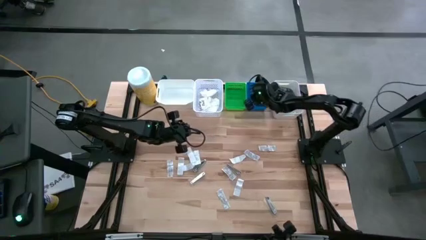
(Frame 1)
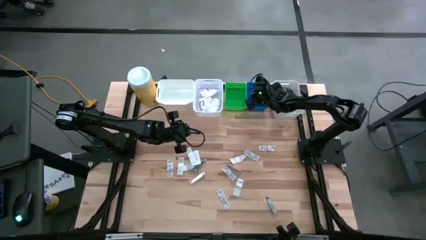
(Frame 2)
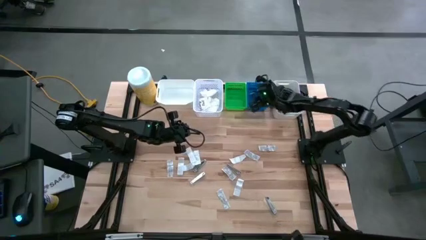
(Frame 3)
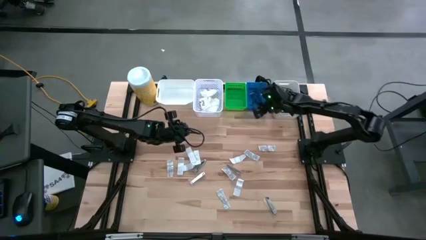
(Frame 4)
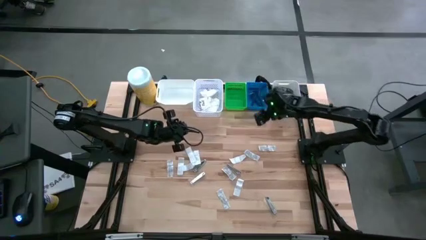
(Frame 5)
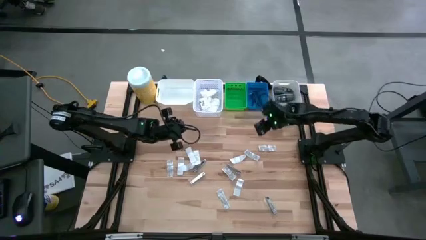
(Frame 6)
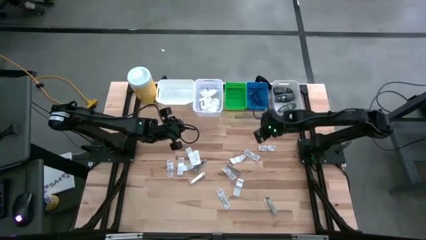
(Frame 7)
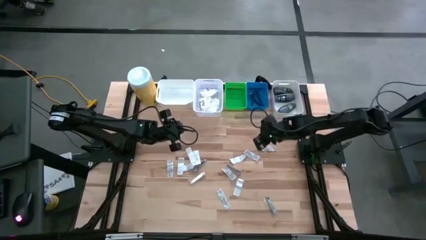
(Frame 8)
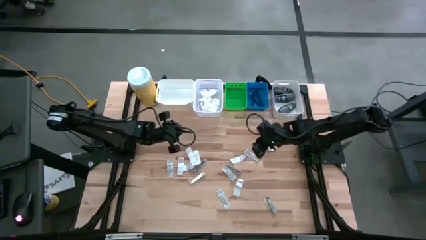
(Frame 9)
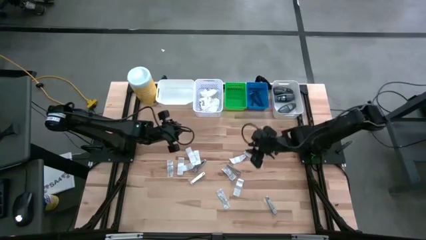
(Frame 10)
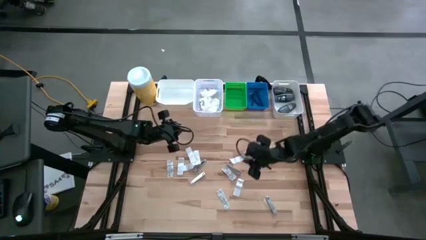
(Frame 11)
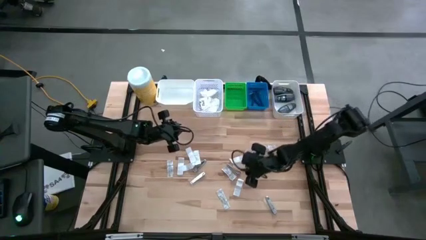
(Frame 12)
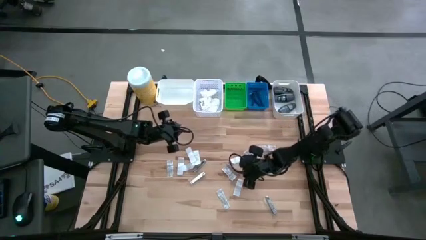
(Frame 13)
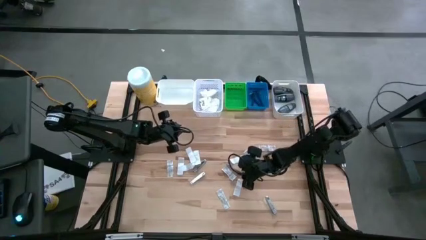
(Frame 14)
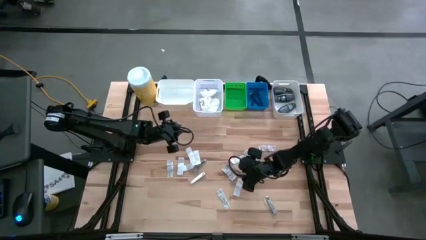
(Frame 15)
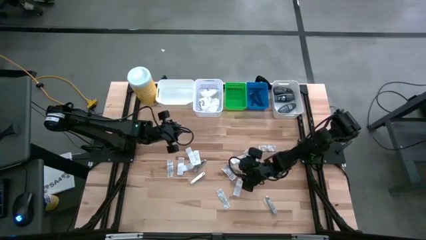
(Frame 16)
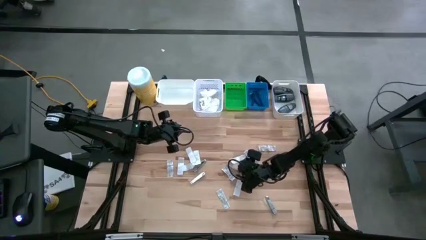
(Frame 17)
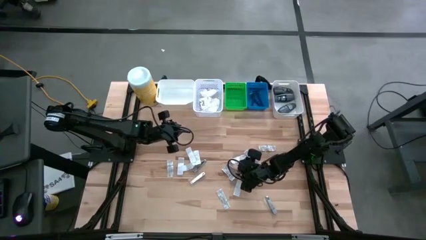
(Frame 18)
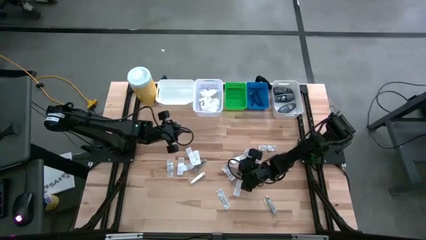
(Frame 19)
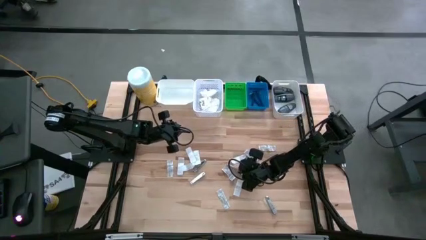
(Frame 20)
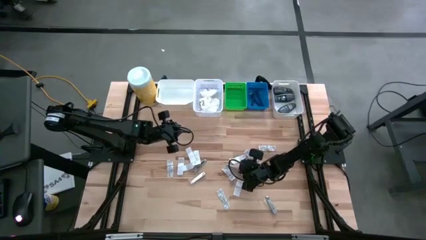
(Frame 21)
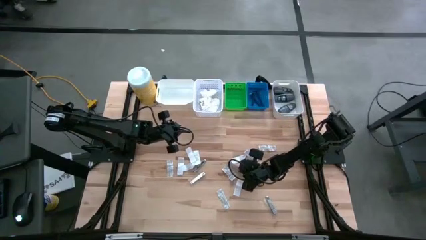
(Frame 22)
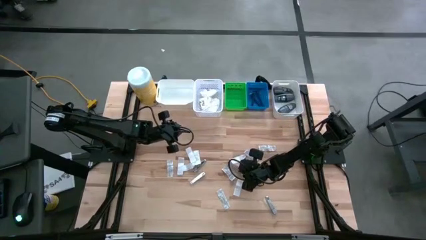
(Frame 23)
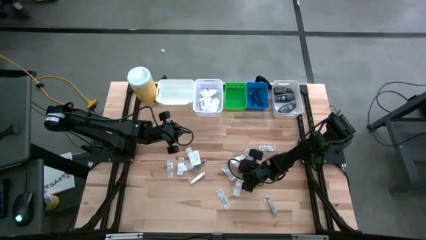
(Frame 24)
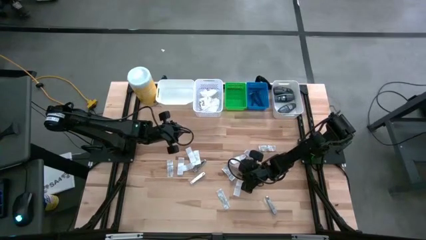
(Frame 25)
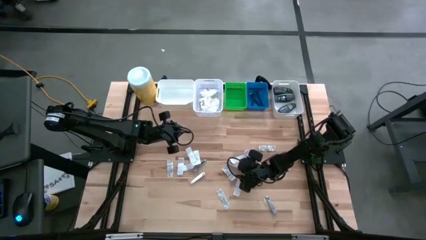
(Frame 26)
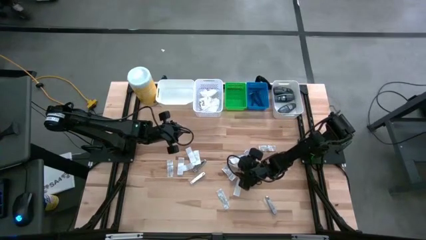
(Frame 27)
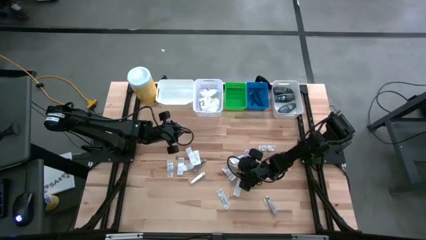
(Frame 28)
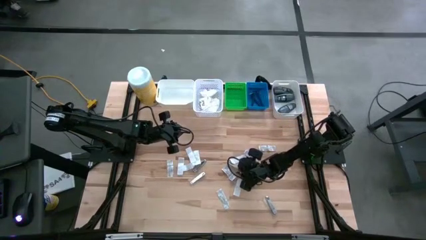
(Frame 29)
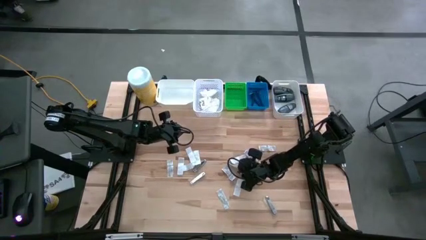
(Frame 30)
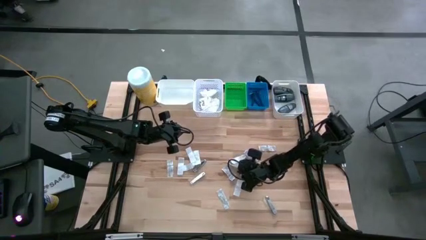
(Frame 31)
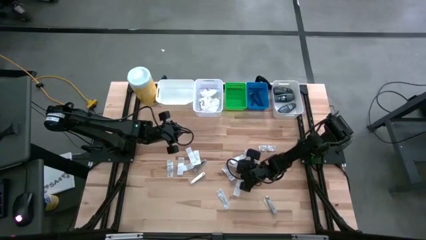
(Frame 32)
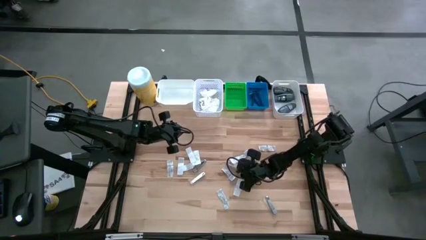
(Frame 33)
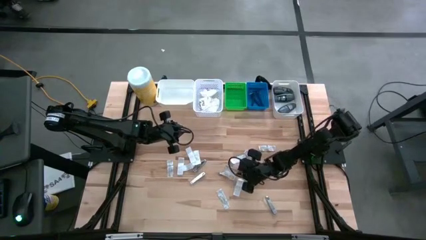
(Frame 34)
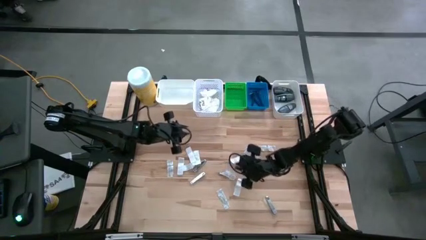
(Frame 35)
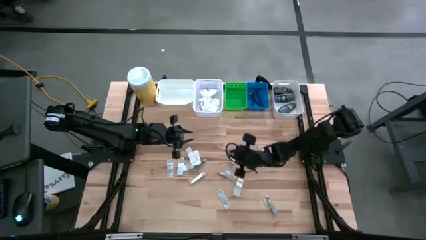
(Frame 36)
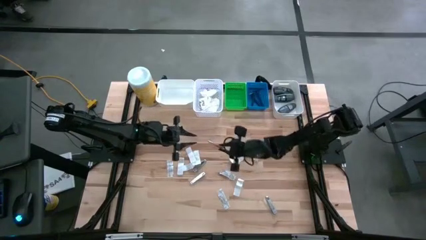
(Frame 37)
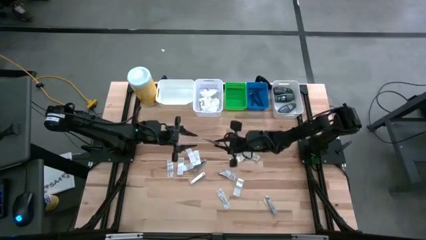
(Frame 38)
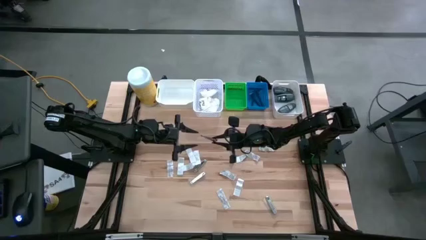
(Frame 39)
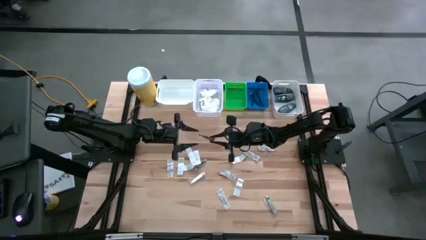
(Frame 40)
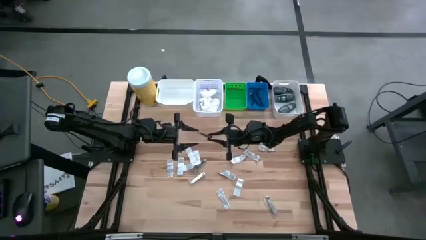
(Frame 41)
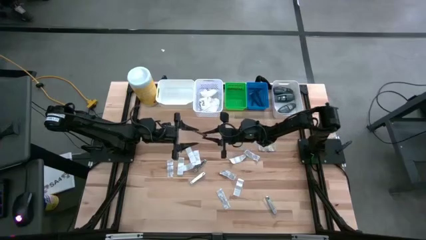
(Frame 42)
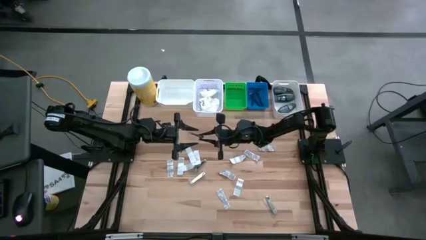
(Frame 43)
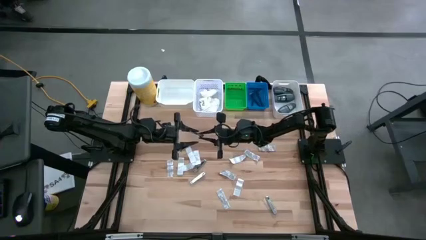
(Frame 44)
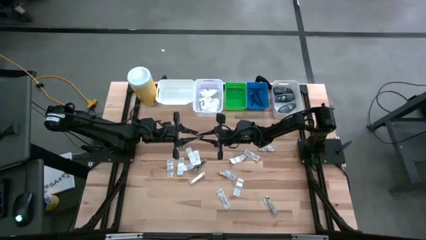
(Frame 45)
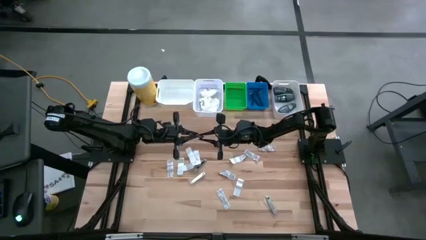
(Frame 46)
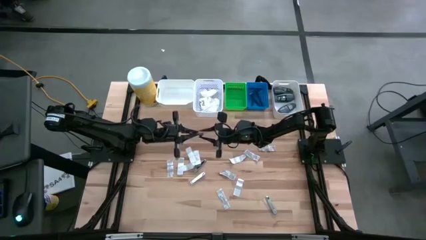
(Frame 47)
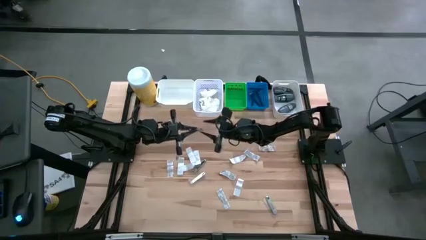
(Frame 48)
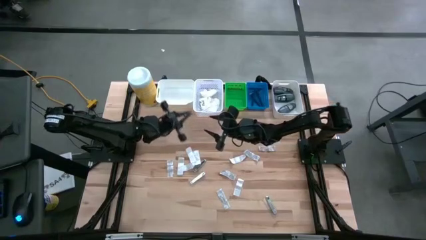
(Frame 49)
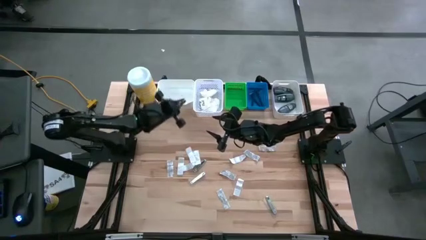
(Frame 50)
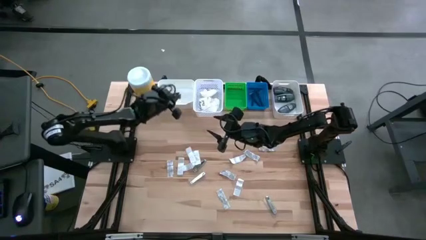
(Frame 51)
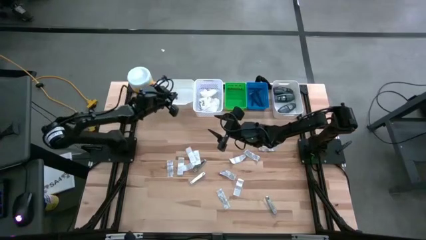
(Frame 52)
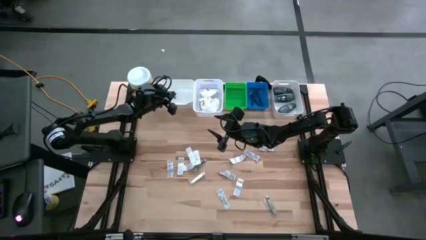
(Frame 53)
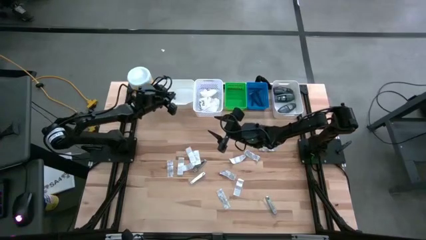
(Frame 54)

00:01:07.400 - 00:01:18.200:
Task: Pick & Place Travel size toiletries
Put the silver nail cutter into the left white bin

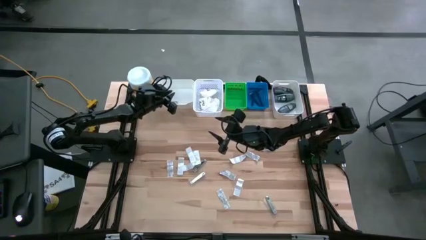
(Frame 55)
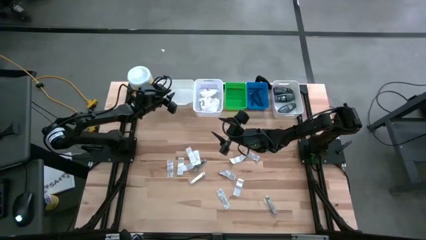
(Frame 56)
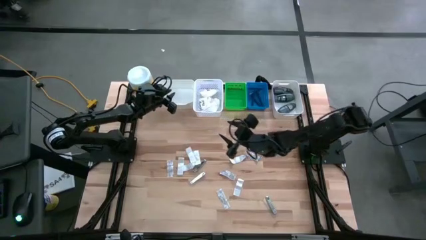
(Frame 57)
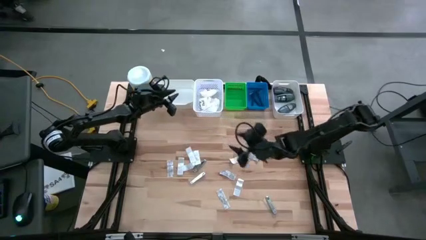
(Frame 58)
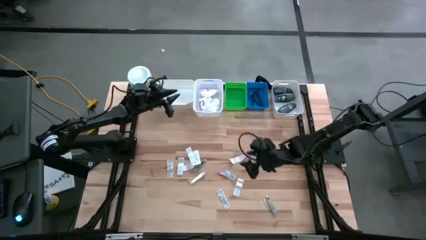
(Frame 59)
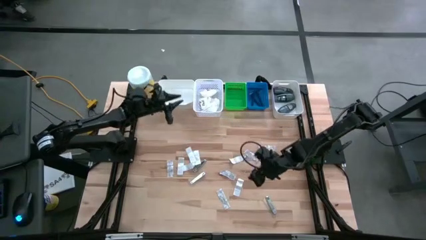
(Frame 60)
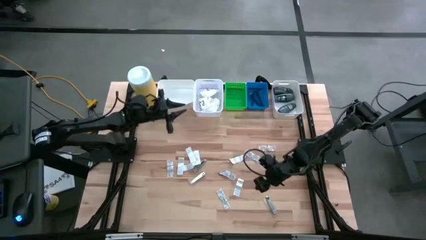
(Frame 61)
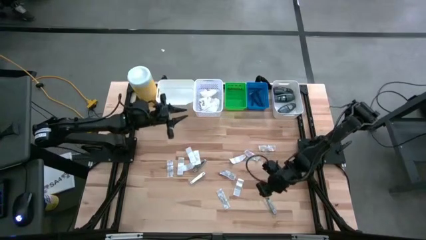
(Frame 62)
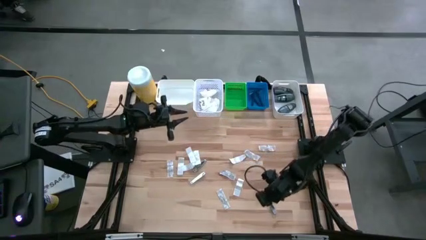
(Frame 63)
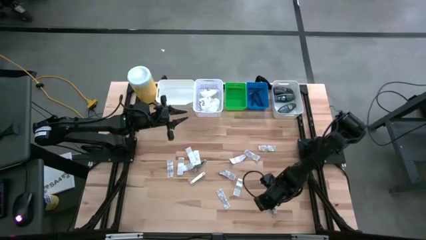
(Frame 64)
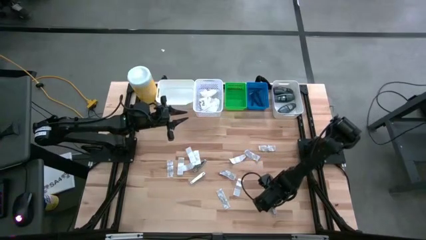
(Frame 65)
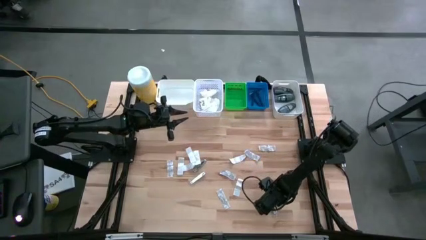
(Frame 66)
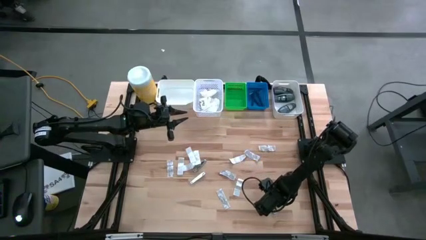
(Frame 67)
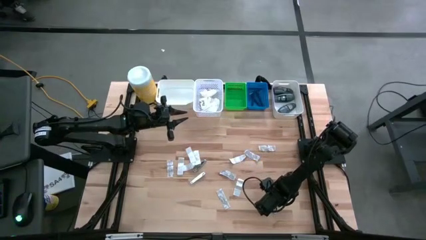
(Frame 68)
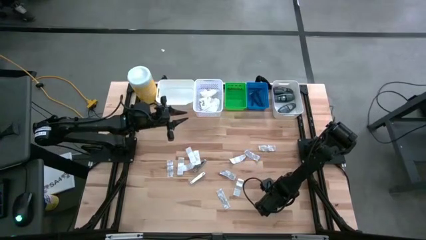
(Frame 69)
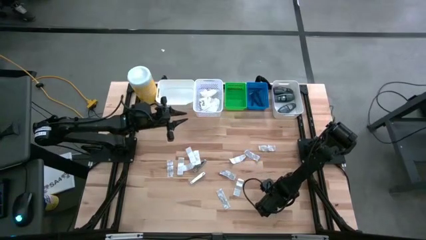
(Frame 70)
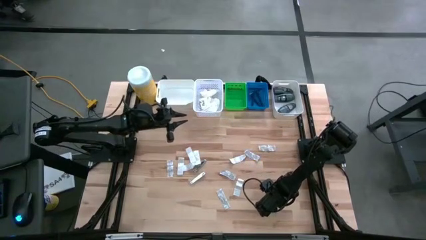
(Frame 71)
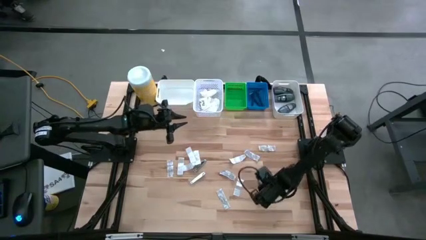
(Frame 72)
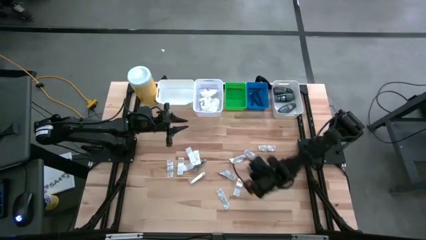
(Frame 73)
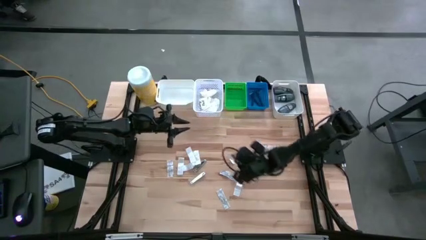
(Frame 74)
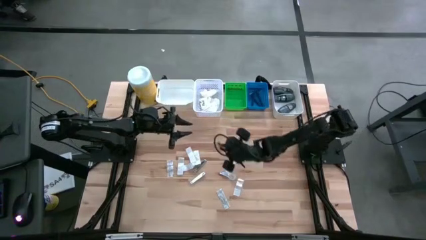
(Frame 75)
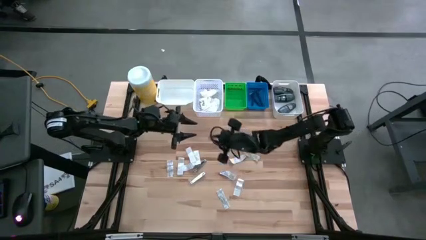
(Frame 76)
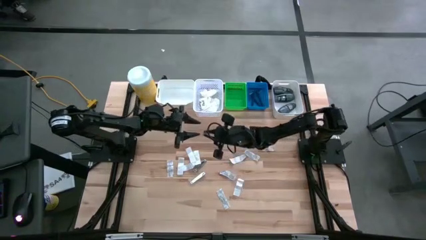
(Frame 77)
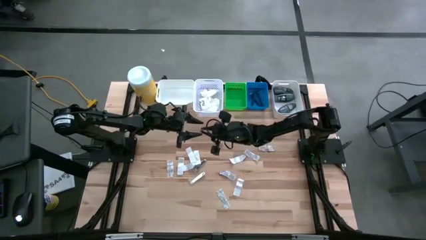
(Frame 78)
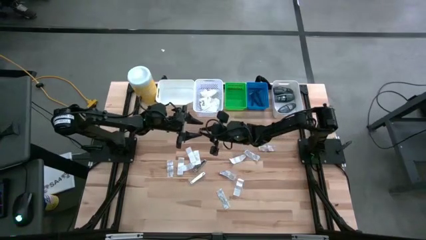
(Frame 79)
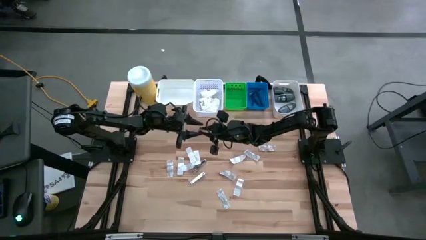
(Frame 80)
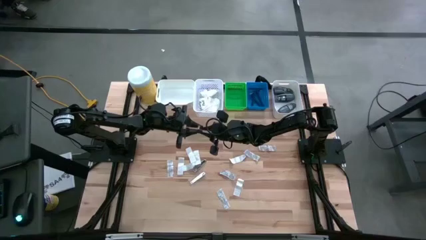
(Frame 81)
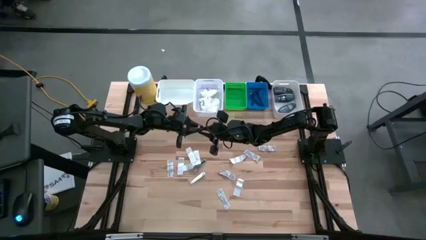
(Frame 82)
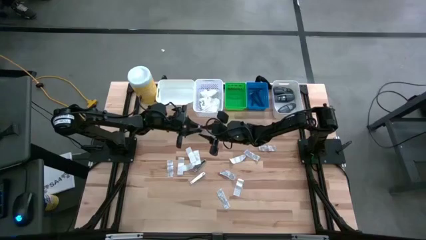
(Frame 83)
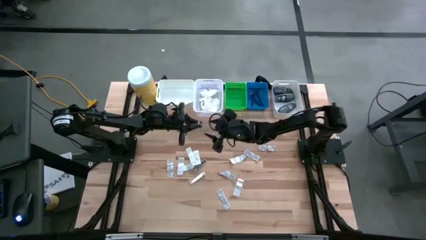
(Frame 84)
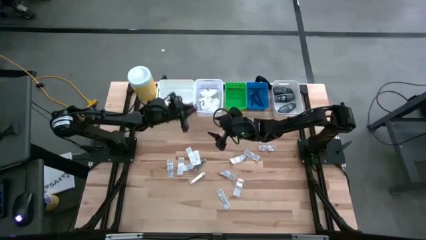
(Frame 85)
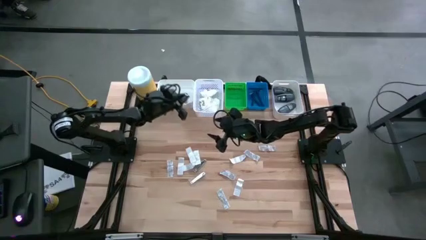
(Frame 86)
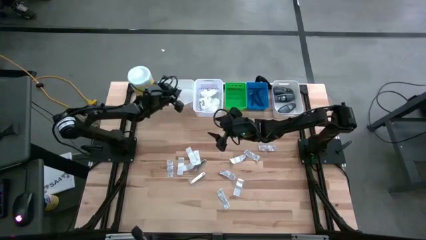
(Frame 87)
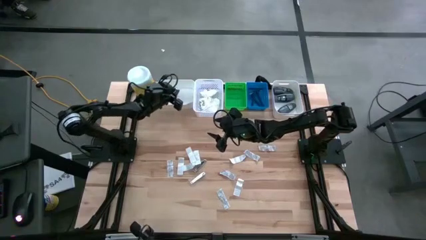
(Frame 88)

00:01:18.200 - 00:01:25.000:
Put the silver nail cutter into the left white bin
